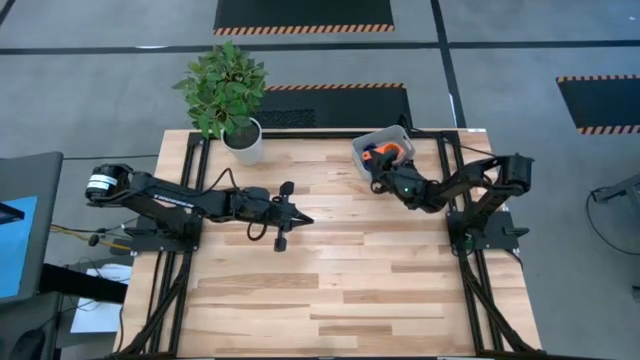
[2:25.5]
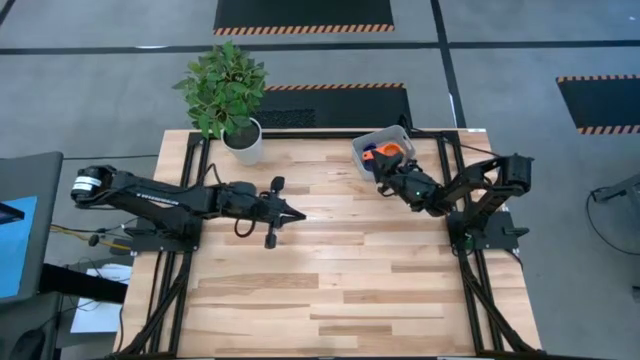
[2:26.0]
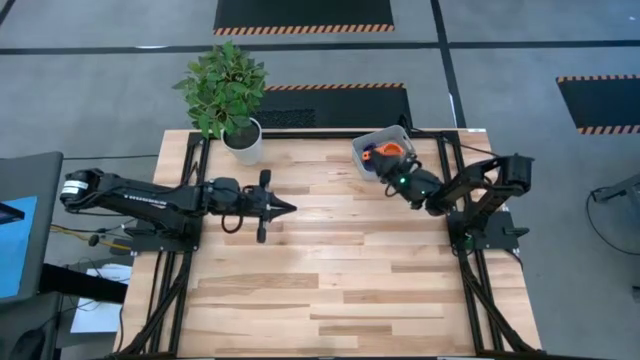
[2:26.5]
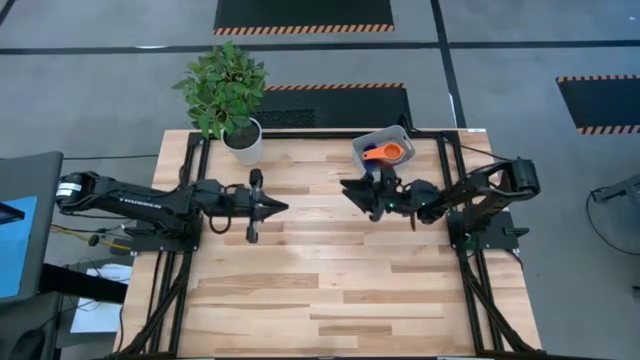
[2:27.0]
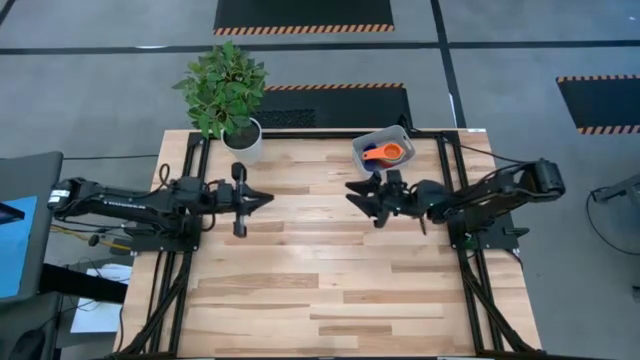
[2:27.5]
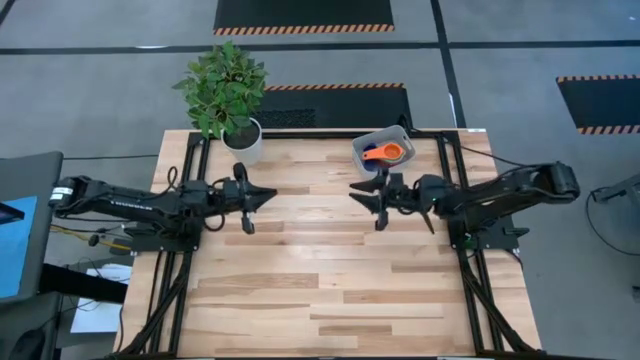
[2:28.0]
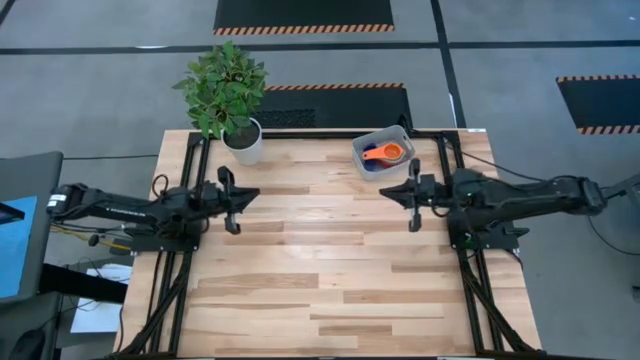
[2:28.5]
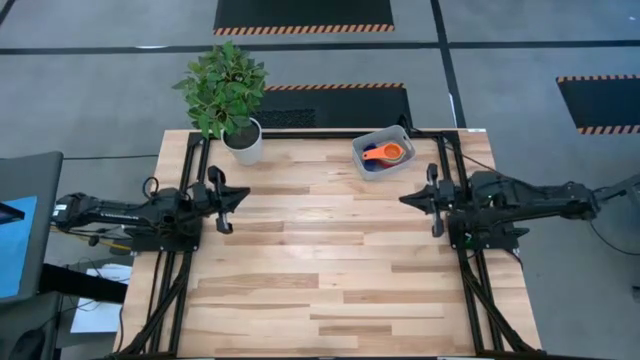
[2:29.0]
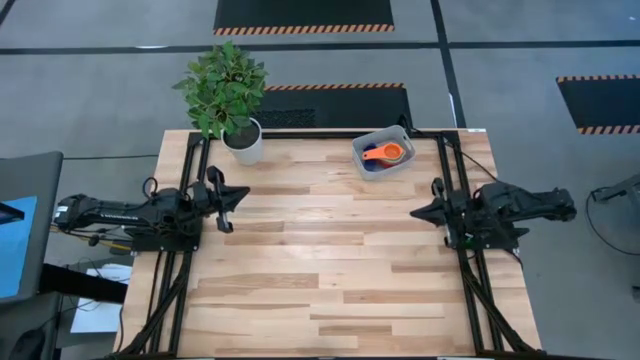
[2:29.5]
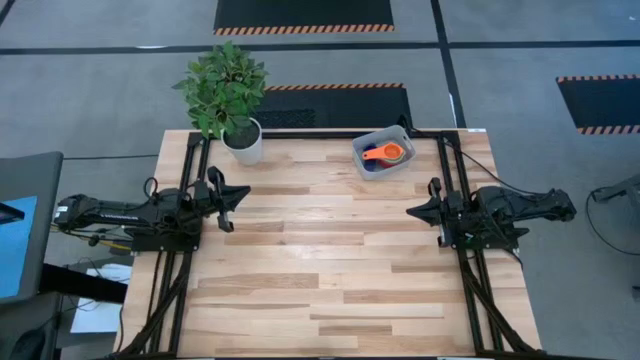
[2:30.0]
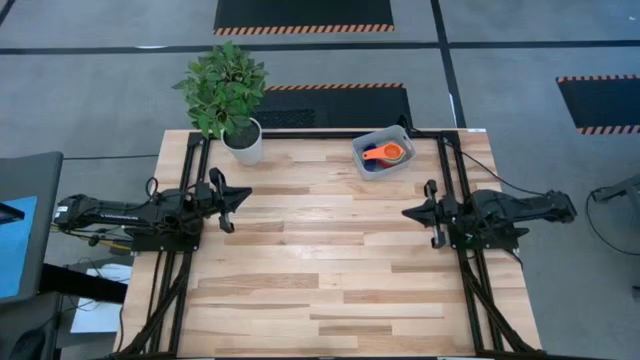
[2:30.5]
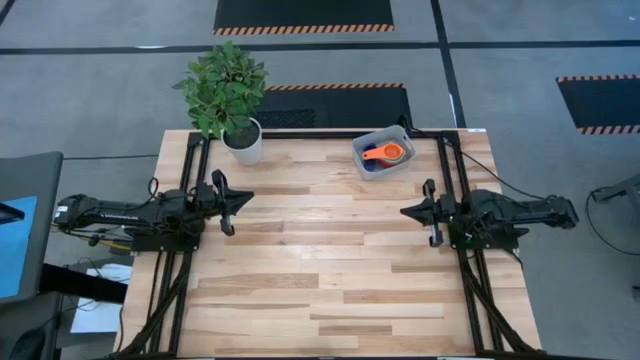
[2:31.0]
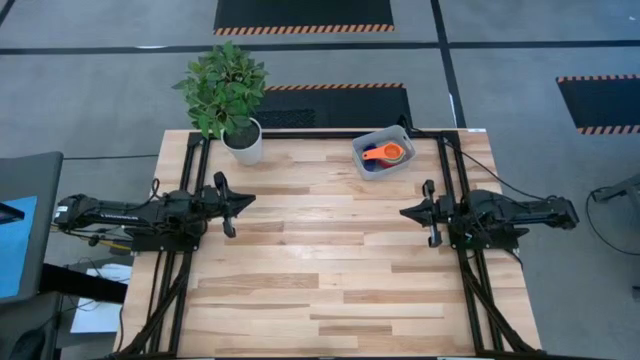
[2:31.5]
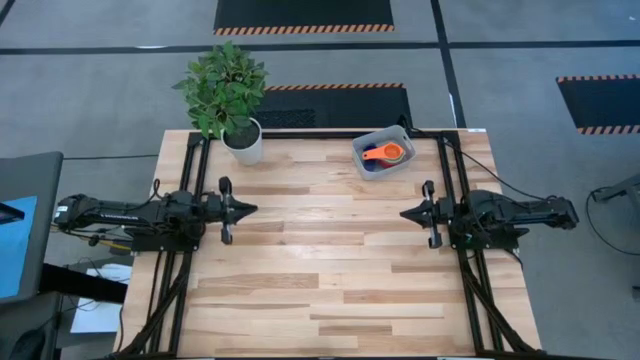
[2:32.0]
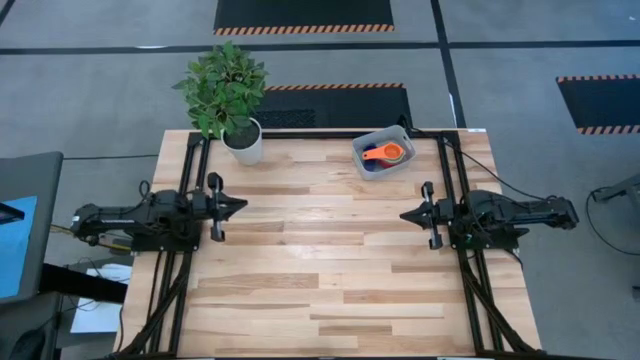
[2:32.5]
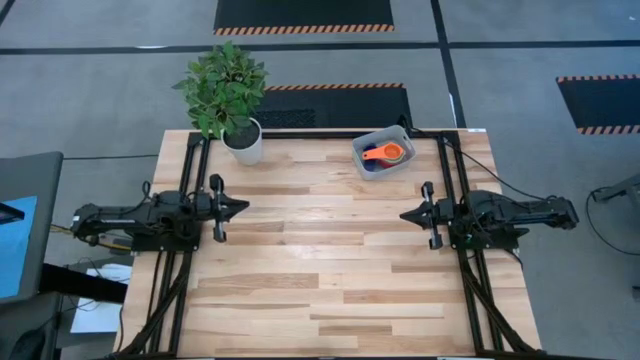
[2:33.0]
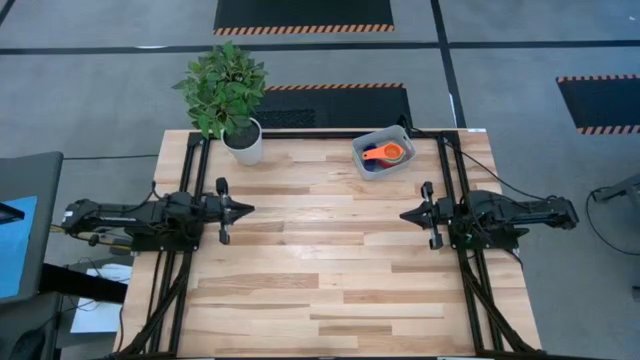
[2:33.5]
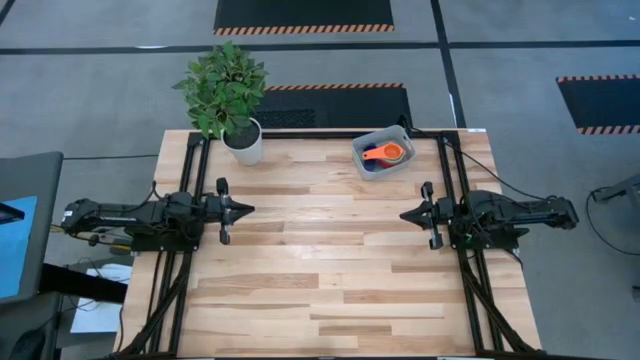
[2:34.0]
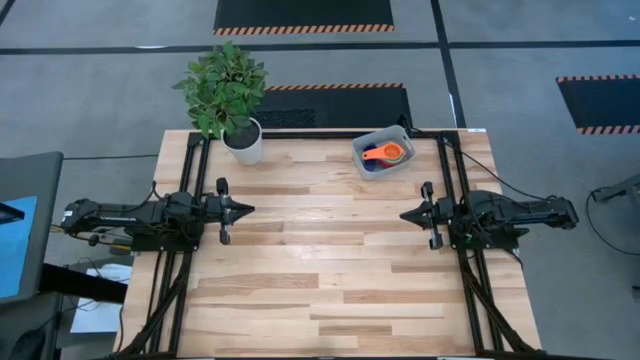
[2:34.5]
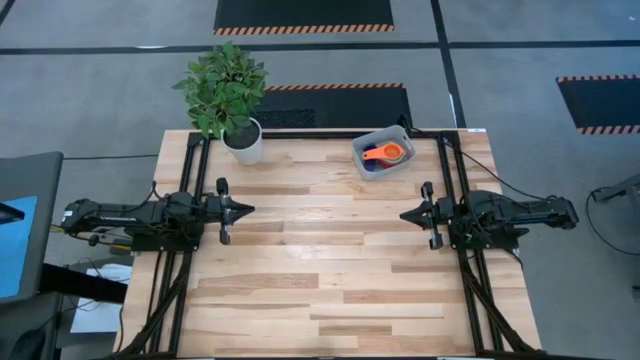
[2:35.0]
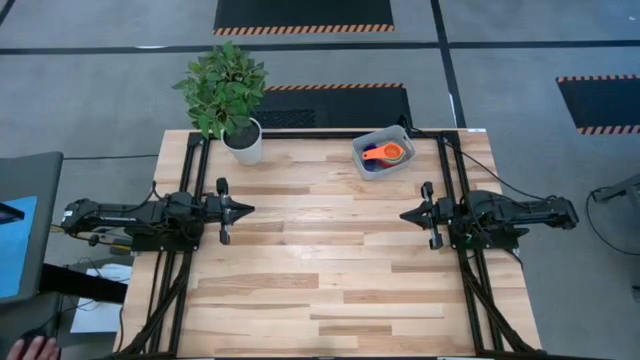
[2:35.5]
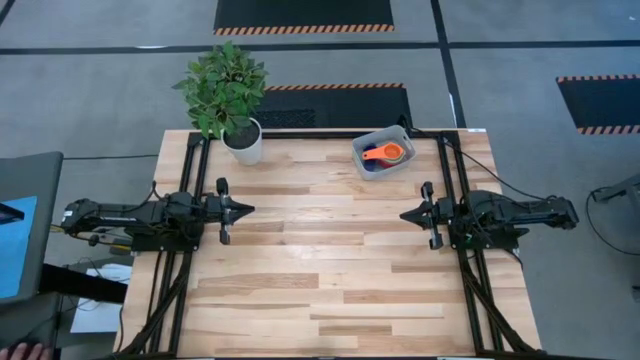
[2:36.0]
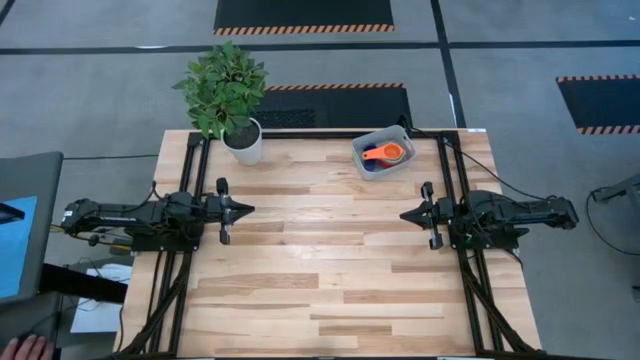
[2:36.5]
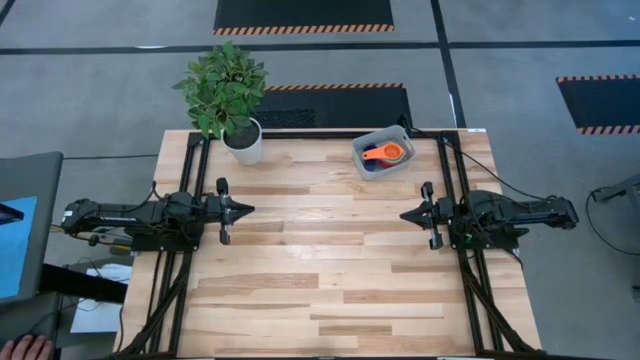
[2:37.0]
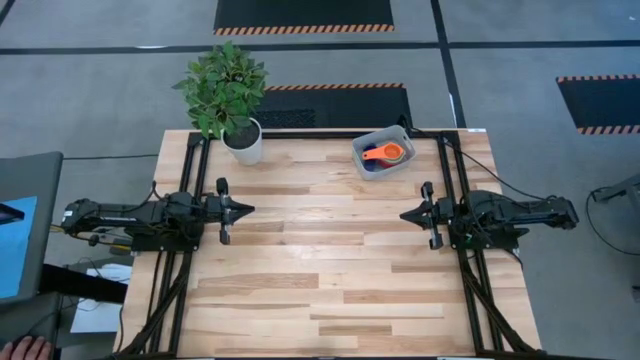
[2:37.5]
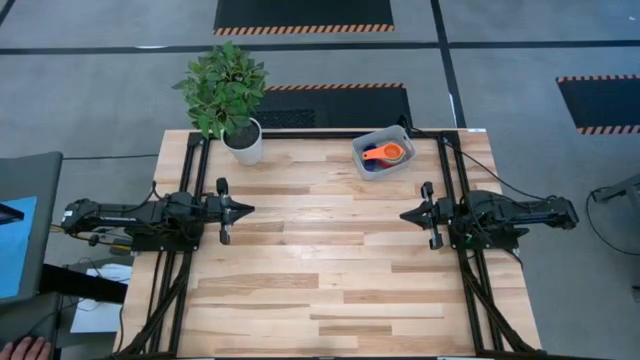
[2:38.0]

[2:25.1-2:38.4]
Task: Nest measuring cups in basket
Return to Home Position

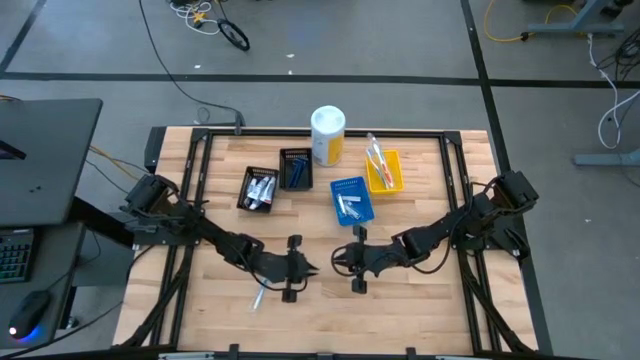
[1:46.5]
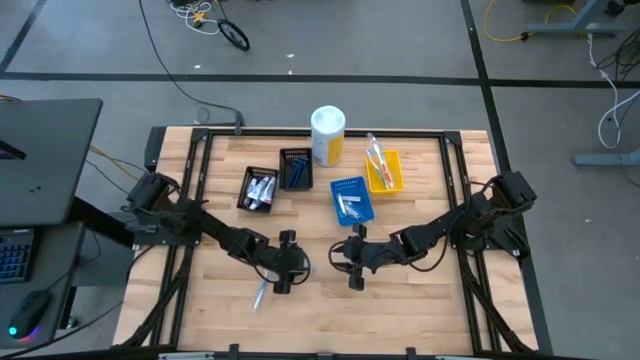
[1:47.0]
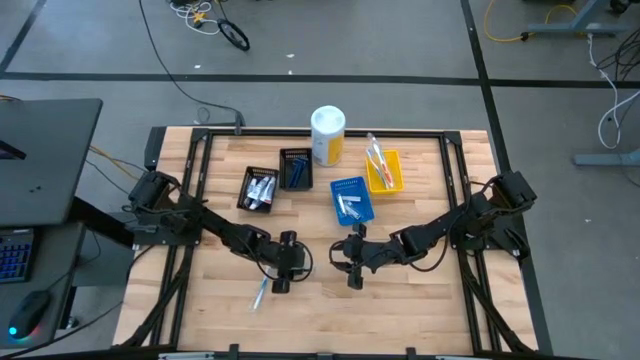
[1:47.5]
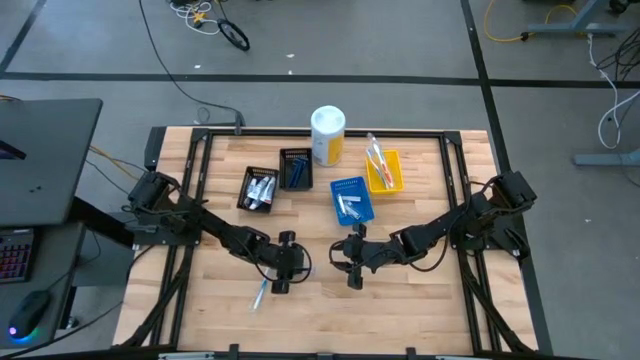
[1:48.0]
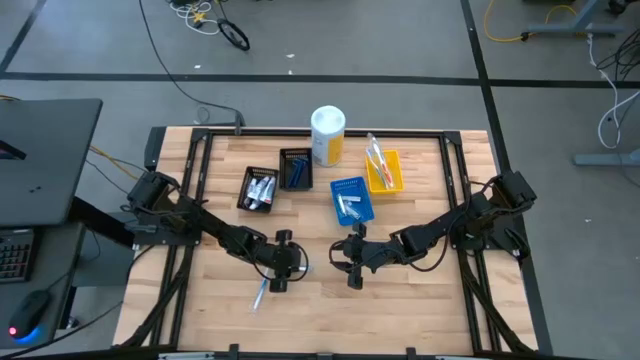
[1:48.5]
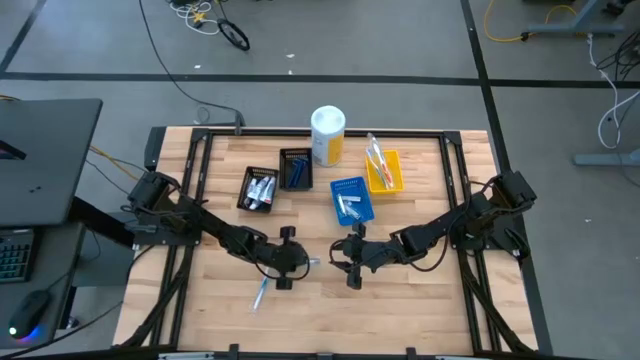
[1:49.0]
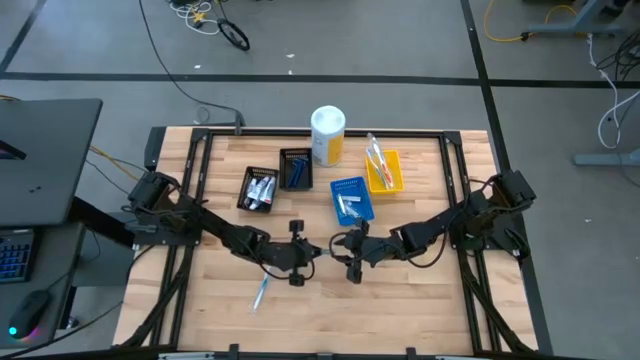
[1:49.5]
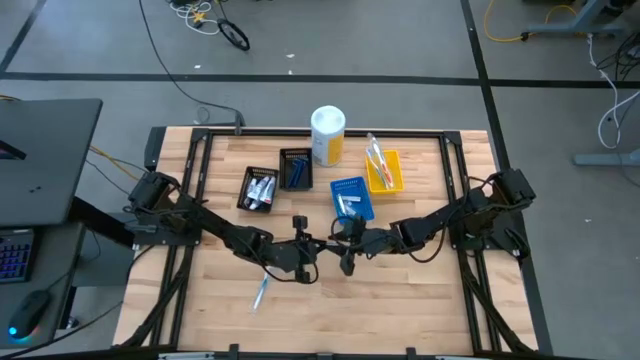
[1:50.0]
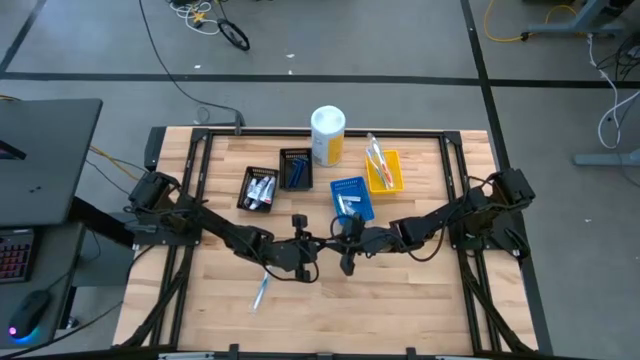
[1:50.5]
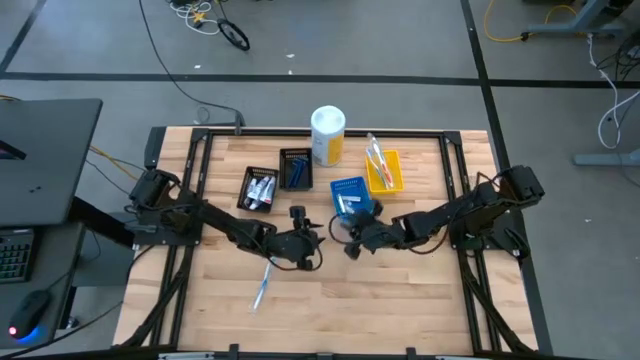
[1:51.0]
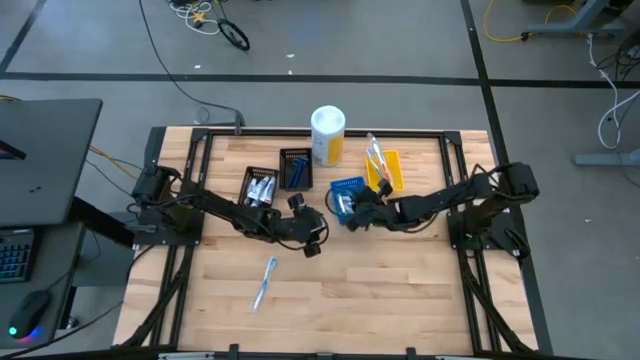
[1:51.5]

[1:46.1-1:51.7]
Task: Pick & Place Travel size toiletries
Put the silver nail cutter into the blue bin

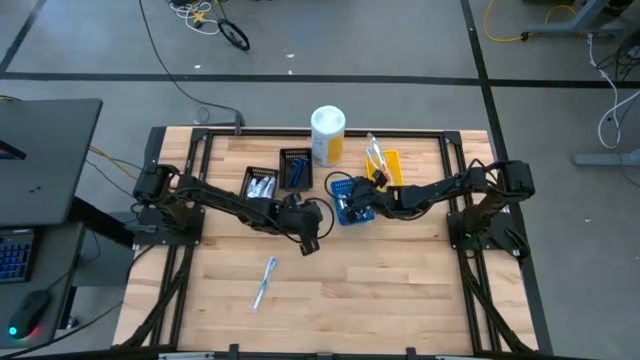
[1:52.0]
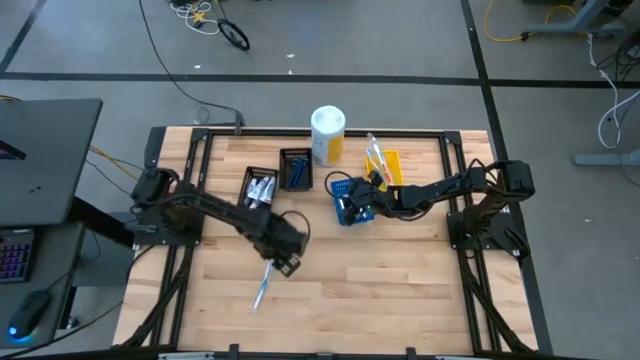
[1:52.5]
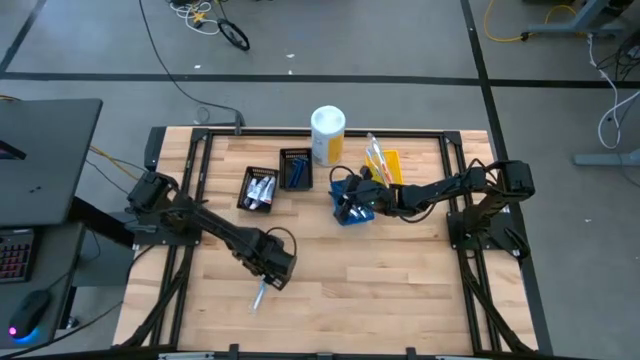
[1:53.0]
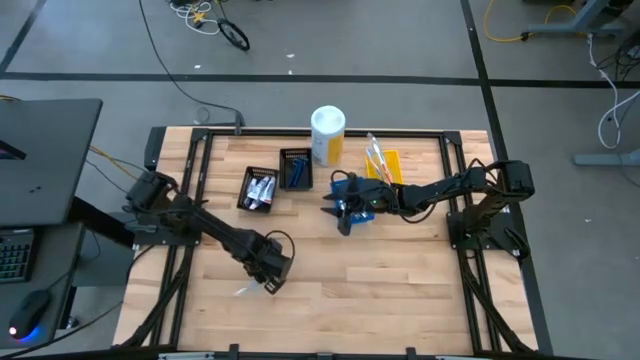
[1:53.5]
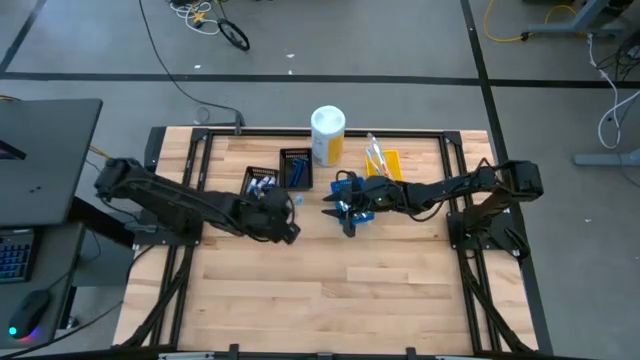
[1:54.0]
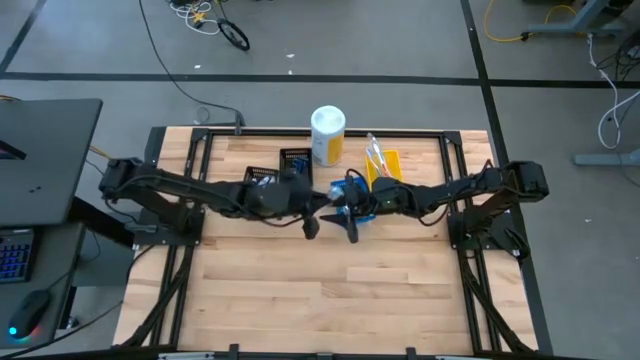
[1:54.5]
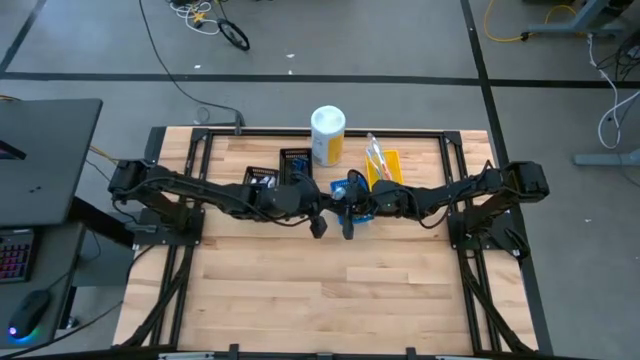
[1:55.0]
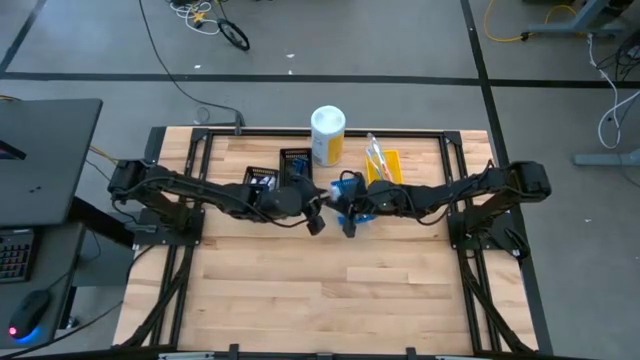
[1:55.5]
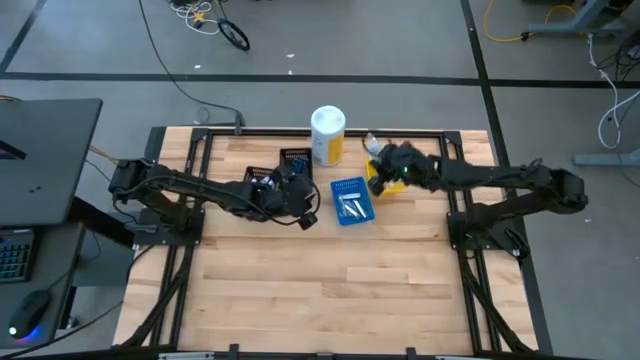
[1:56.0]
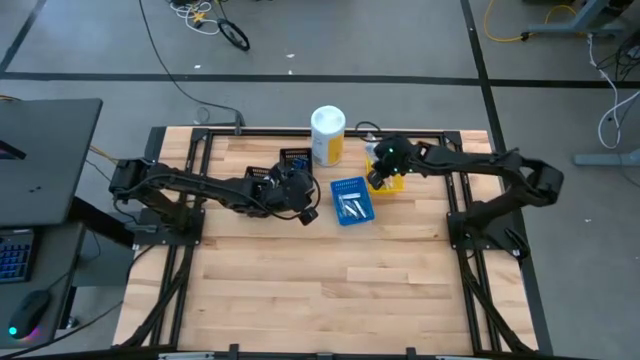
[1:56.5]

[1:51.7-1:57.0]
Put the blue toothbrush into the yellow bin
